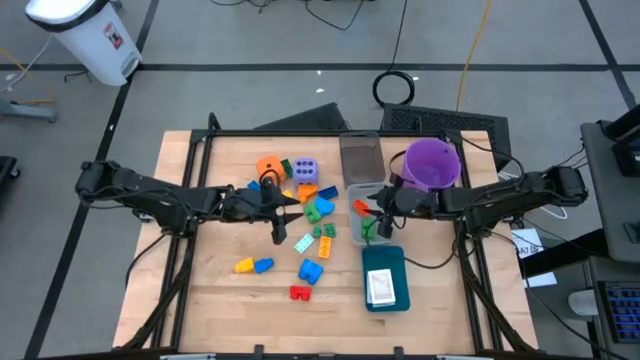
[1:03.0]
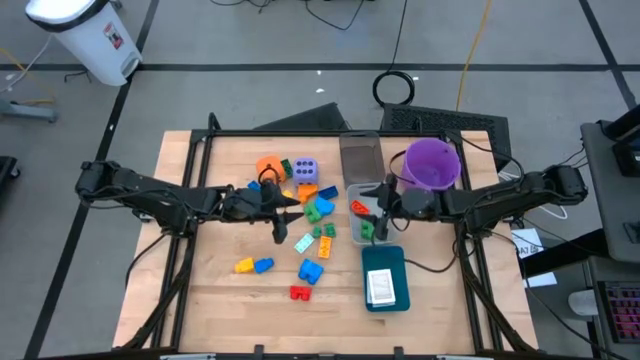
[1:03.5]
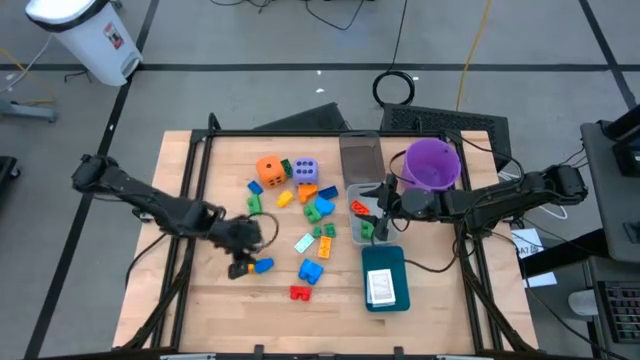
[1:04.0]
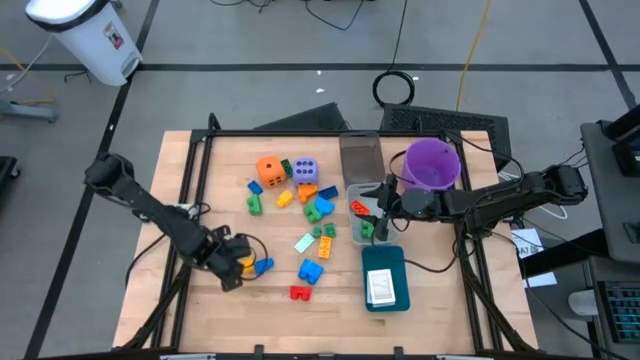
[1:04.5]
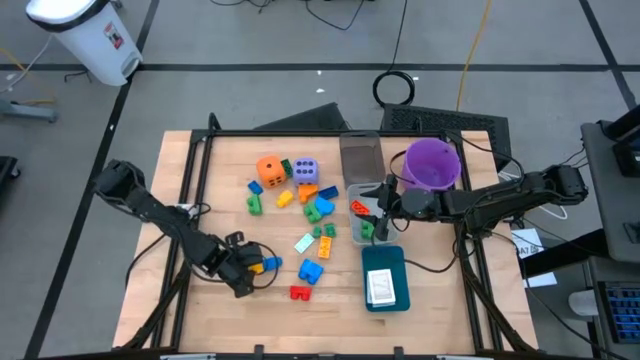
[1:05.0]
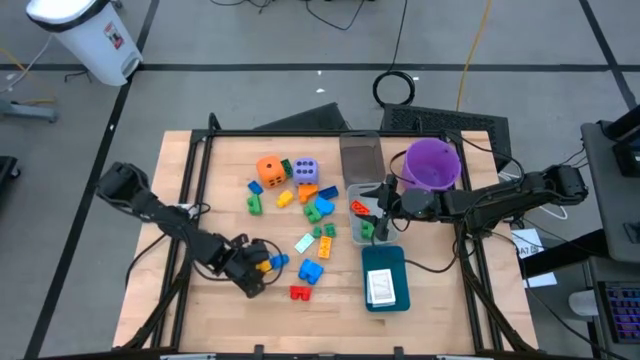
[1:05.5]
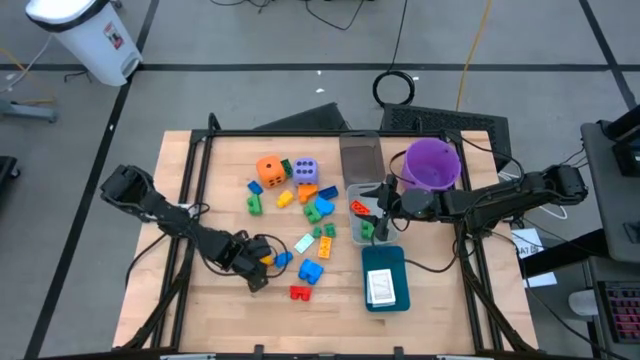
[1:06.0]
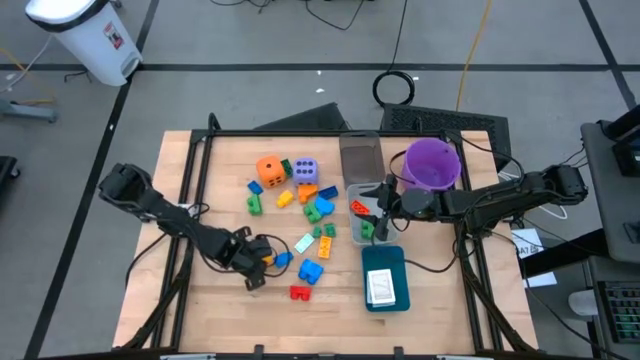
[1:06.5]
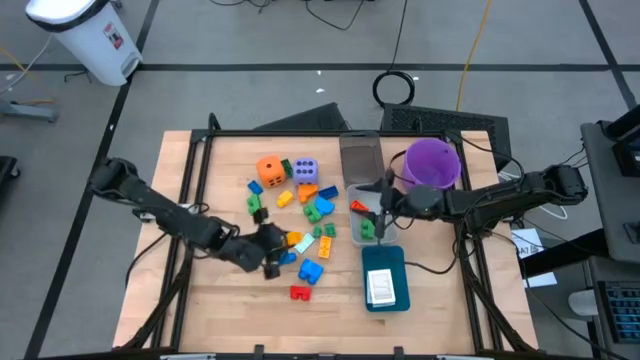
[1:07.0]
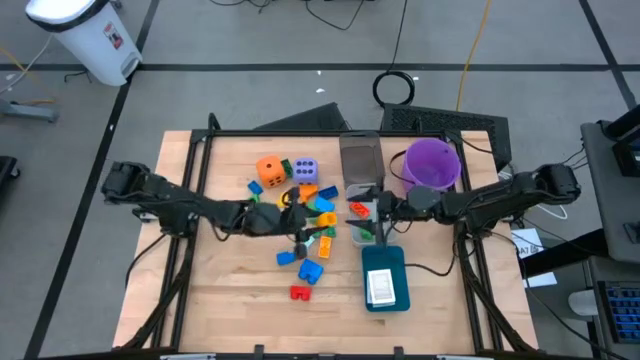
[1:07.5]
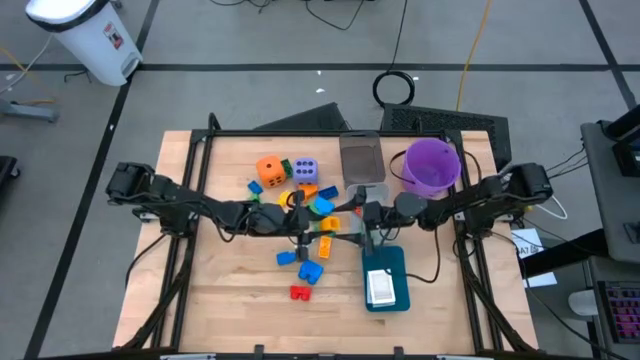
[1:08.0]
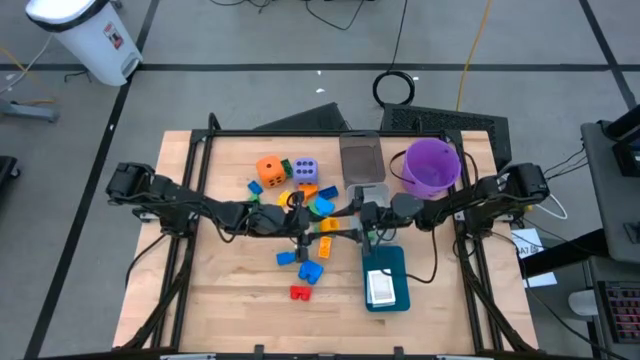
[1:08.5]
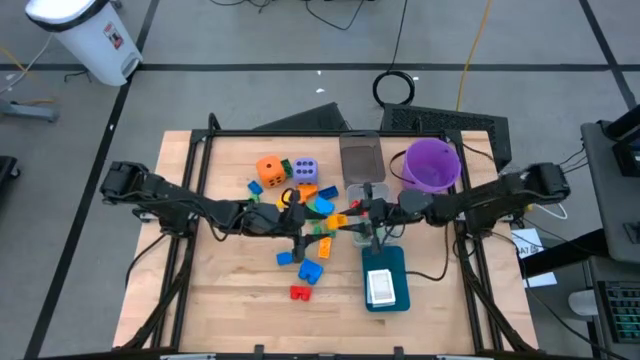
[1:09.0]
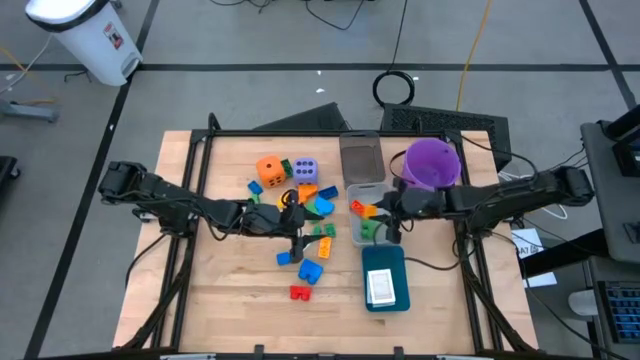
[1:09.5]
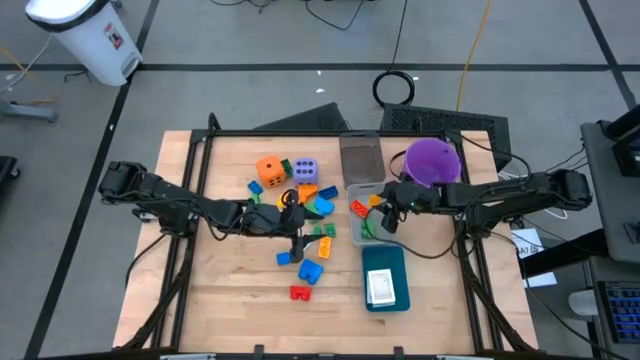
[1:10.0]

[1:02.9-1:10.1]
Task: Pick & Place Toys
Put the yellow game piece into the gray bin

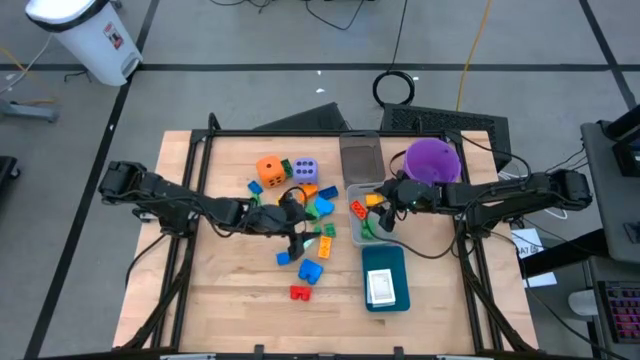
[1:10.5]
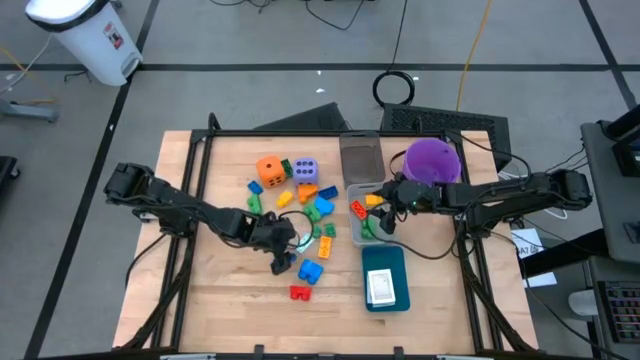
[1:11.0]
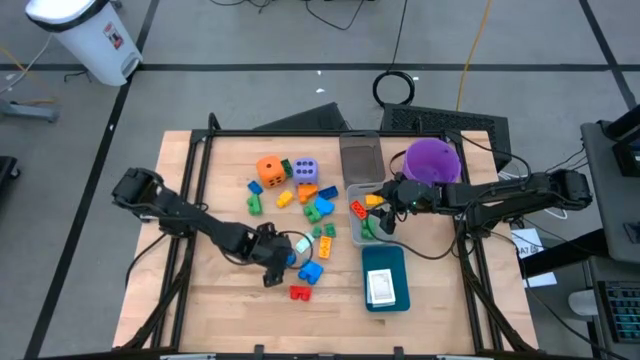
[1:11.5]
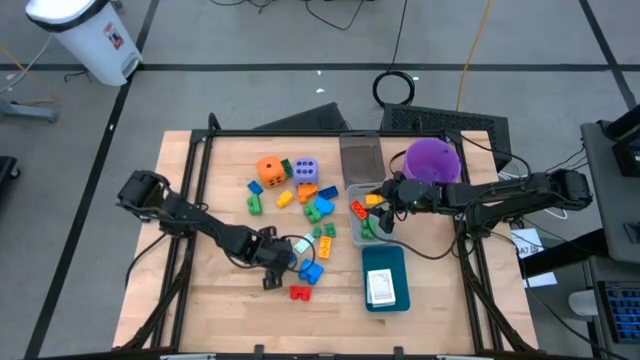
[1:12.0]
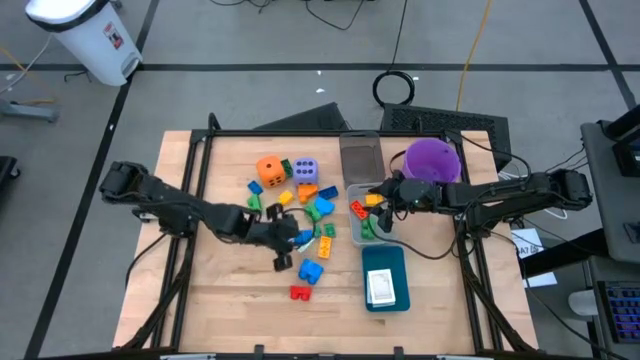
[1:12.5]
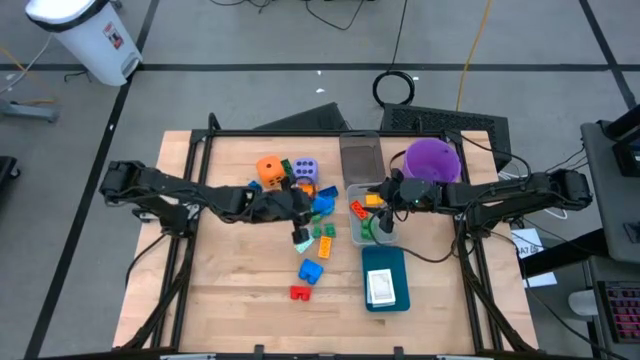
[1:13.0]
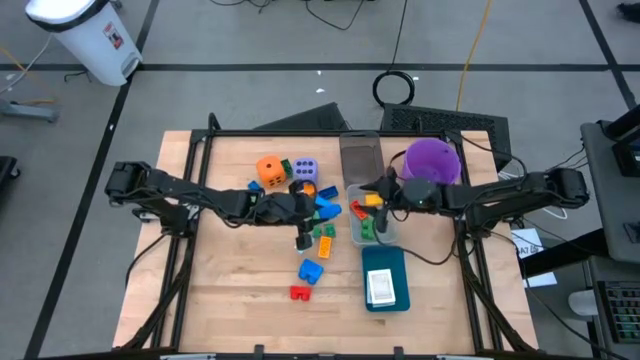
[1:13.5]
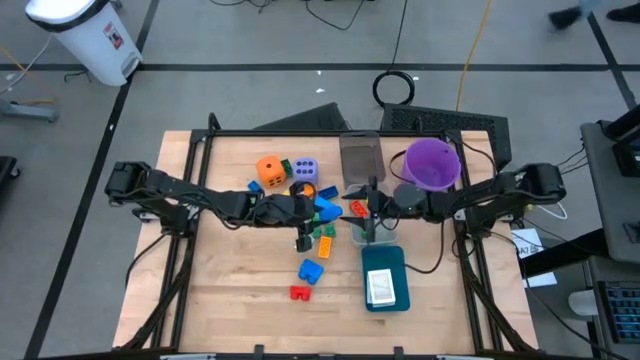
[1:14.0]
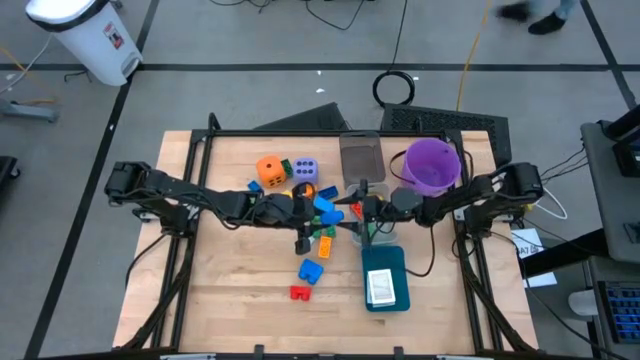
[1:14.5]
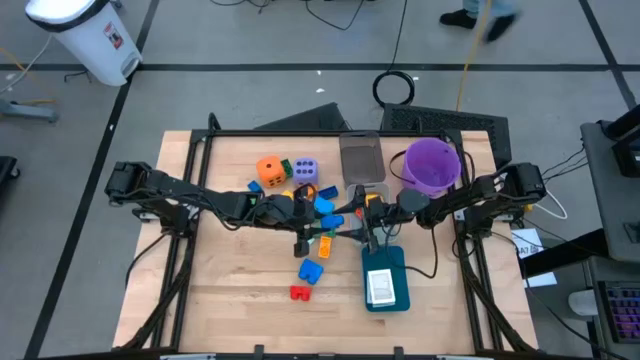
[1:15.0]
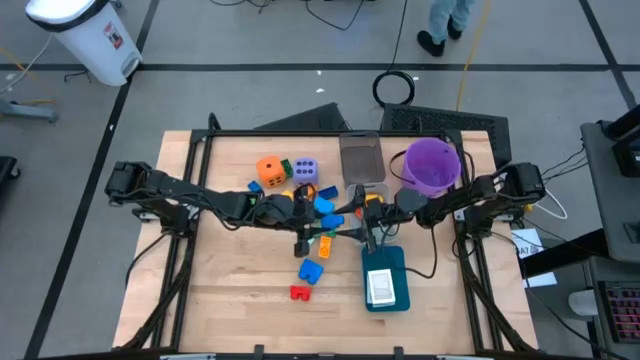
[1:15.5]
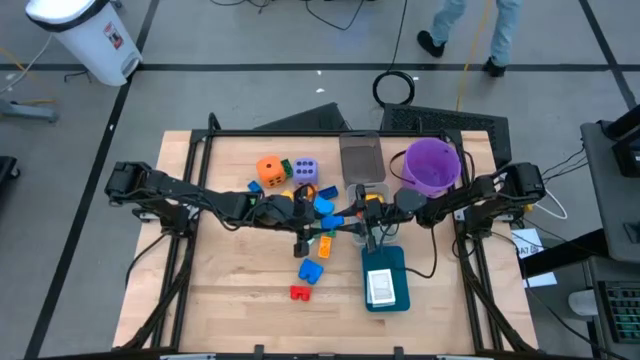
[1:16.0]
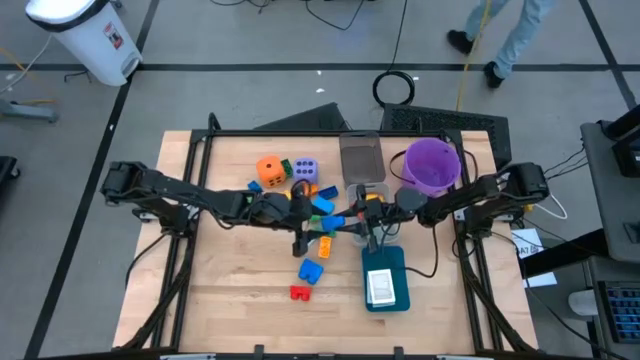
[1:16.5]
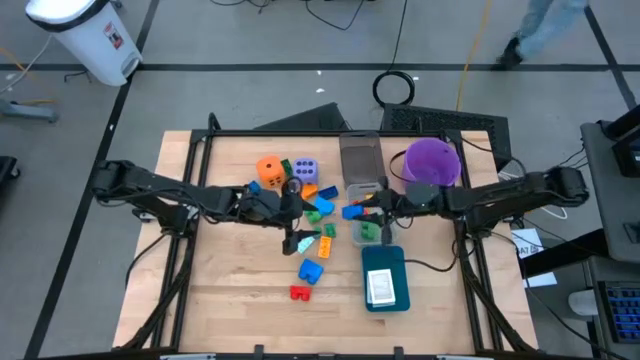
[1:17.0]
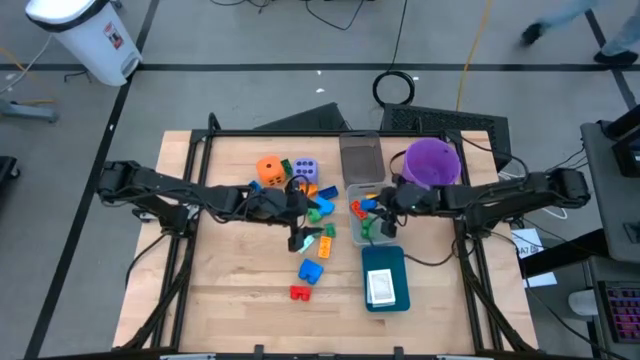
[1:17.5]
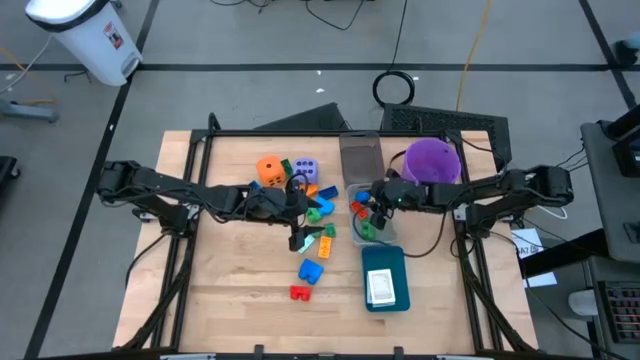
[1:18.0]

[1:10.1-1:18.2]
Put the blue game piece into the gray bin

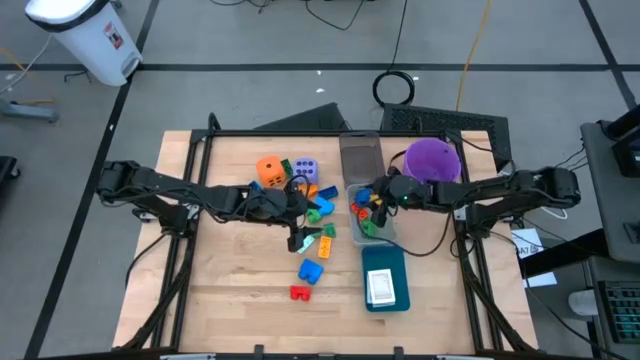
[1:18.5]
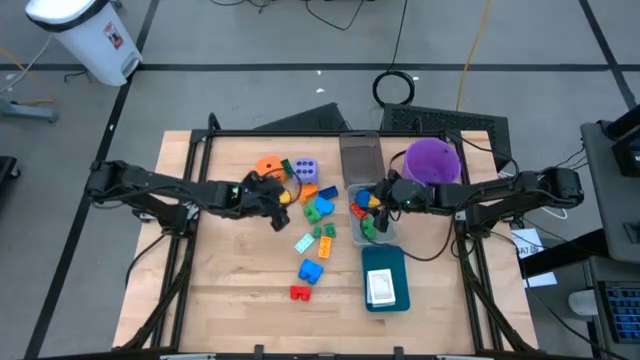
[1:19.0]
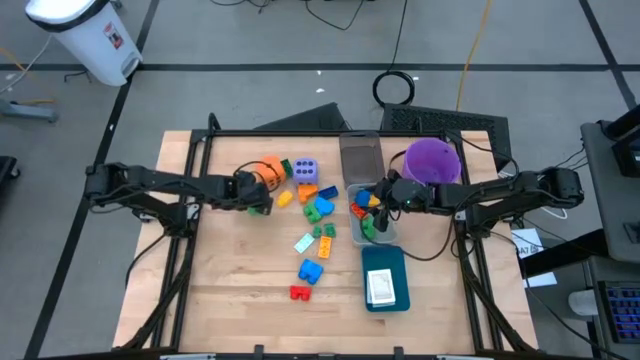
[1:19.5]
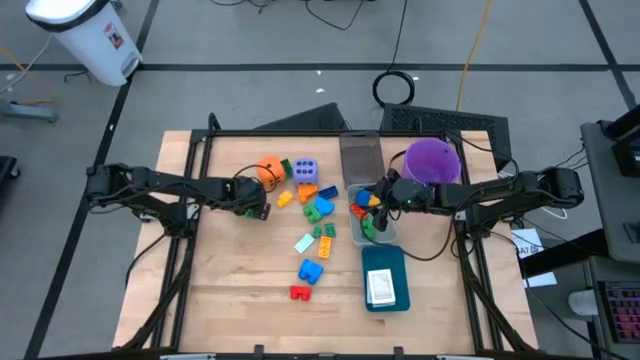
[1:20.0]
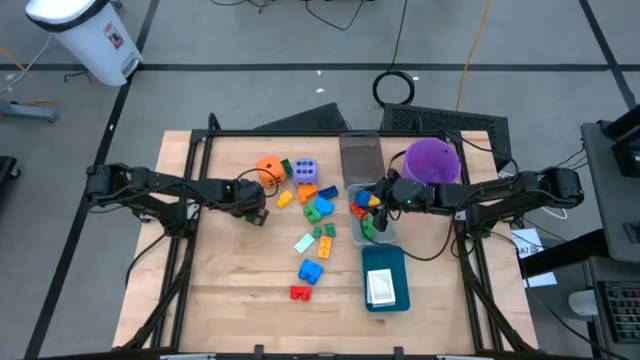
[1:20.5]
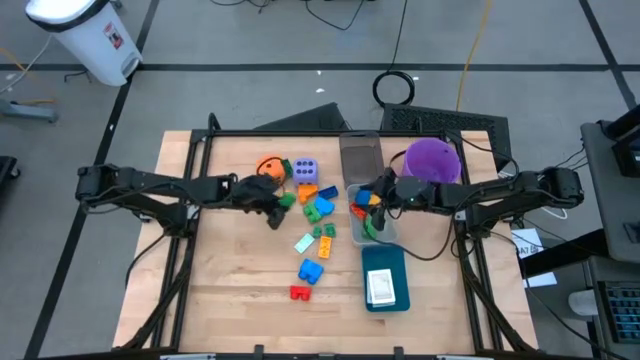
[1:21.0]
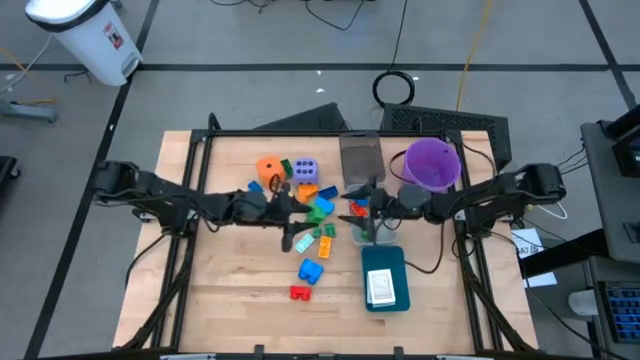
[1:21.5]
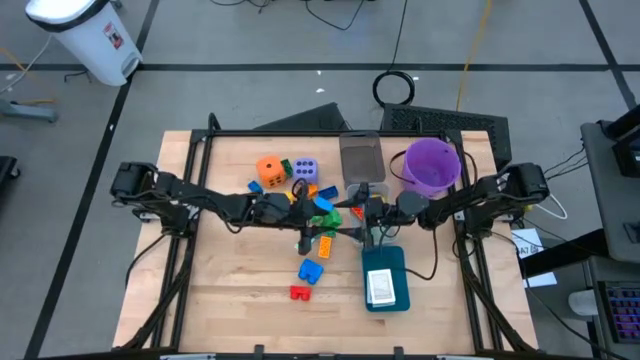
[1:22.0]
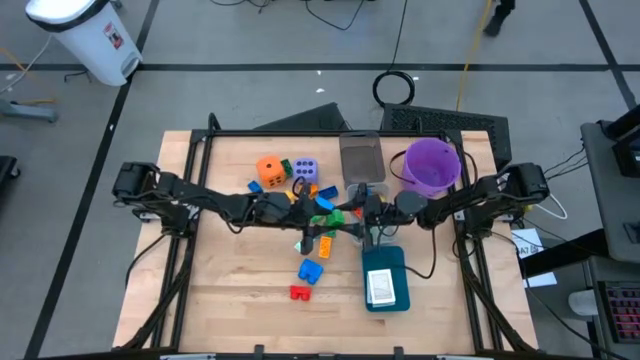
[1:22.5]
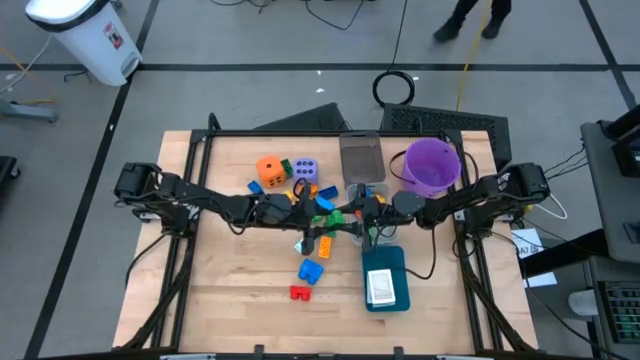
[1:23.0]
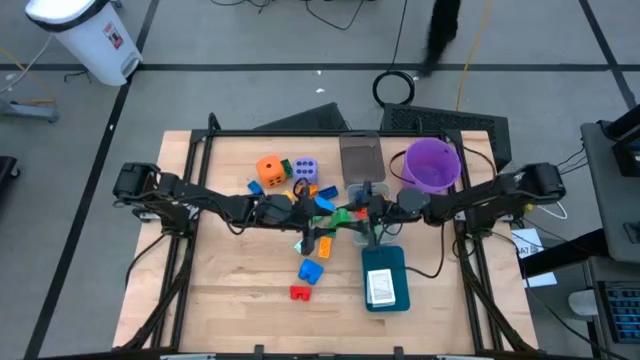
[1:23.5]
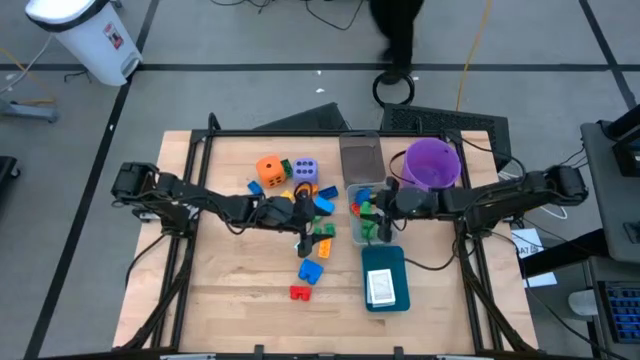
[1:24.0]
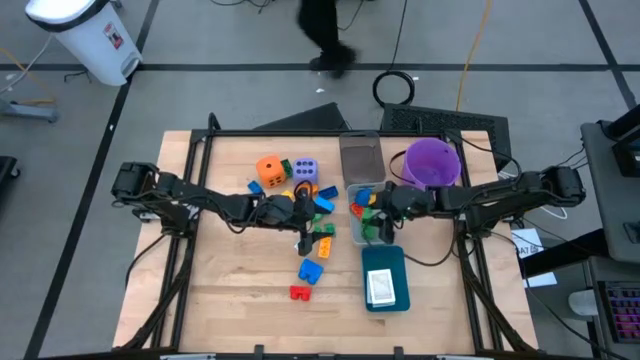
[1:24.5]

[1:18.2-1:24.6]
Put the green game piece into the gray bin
